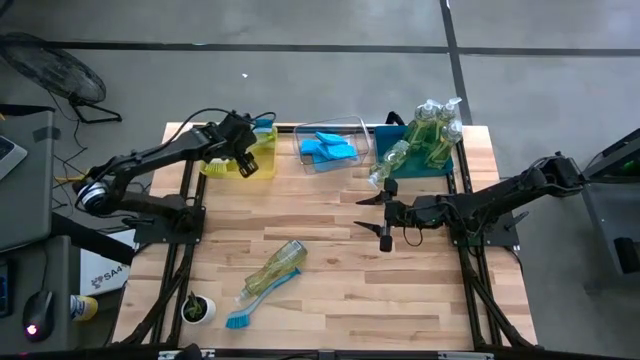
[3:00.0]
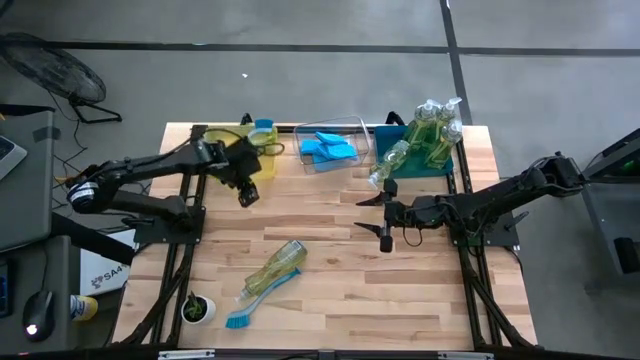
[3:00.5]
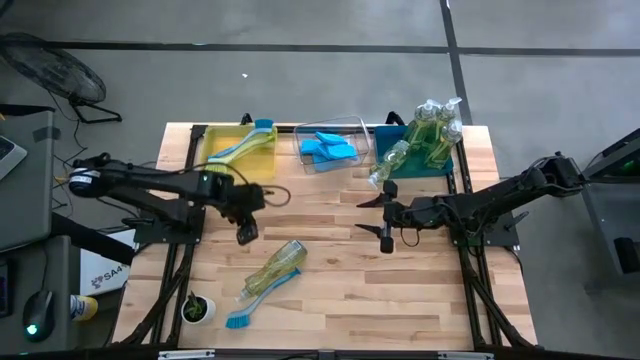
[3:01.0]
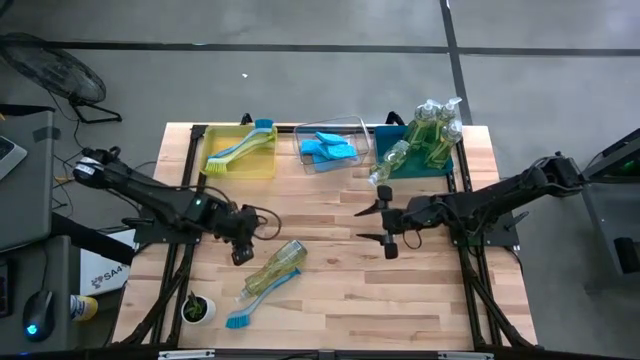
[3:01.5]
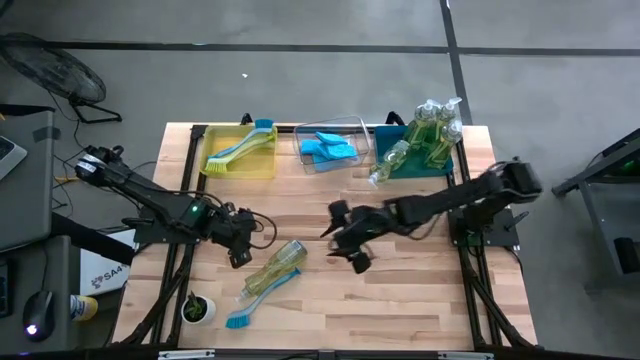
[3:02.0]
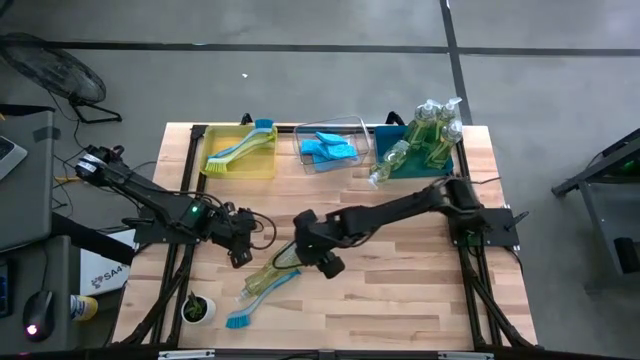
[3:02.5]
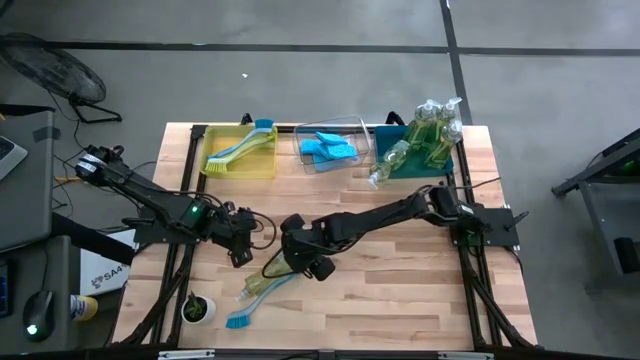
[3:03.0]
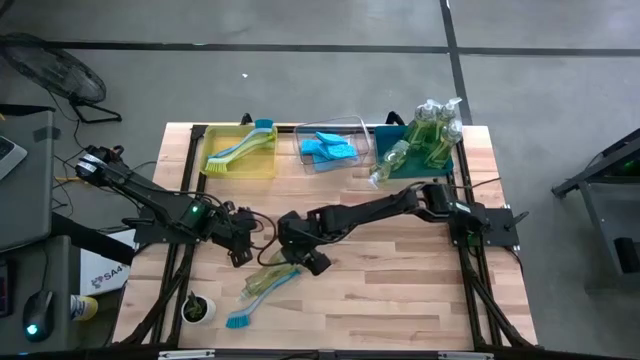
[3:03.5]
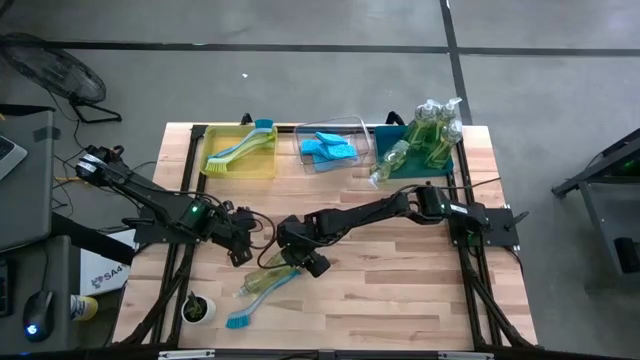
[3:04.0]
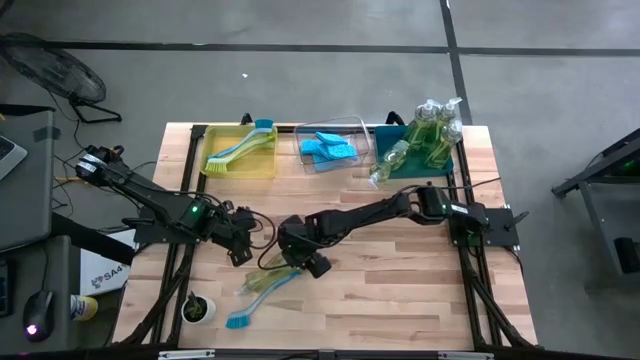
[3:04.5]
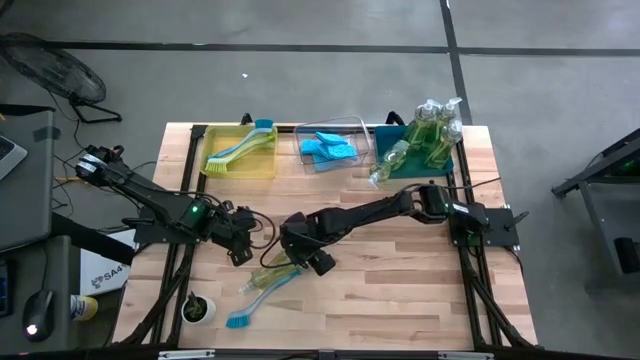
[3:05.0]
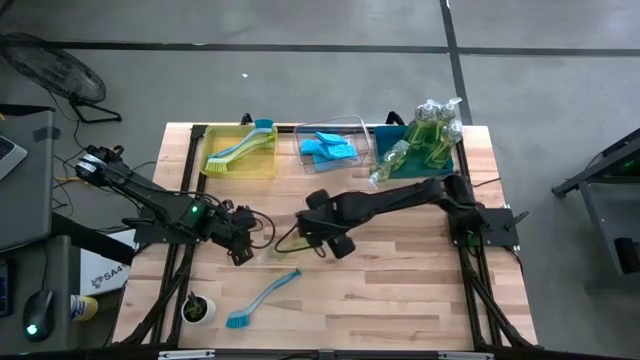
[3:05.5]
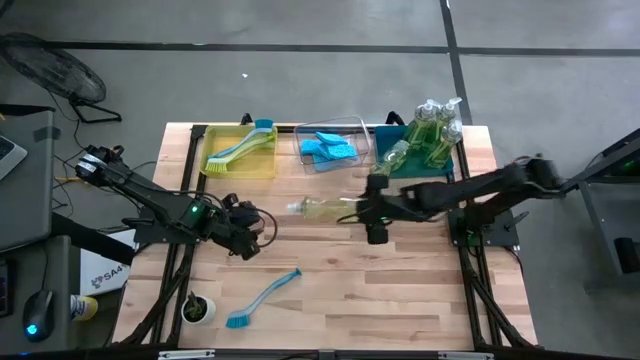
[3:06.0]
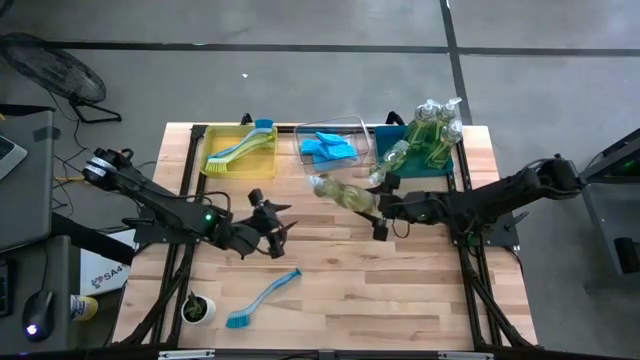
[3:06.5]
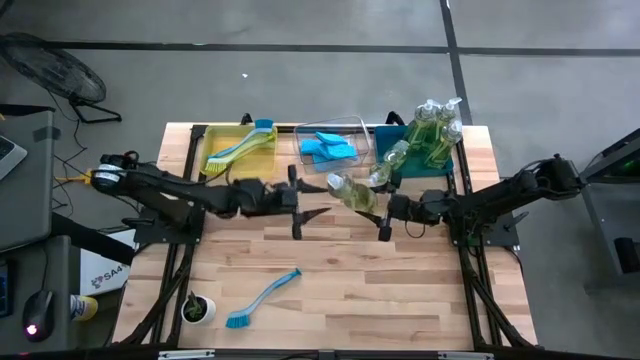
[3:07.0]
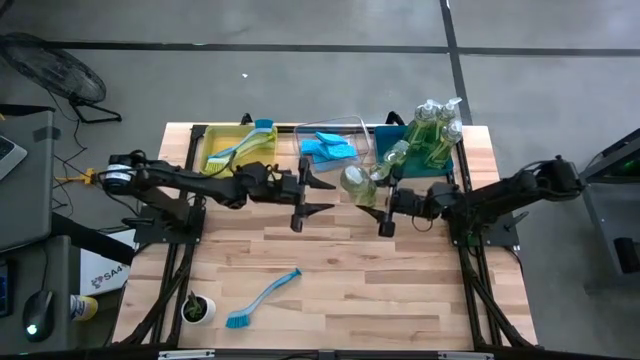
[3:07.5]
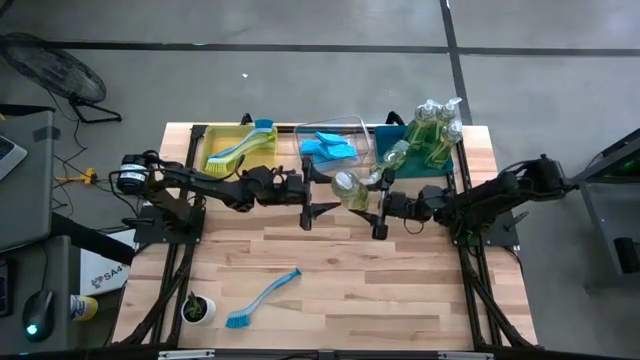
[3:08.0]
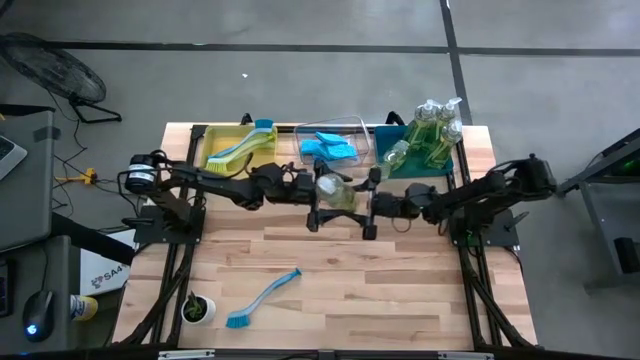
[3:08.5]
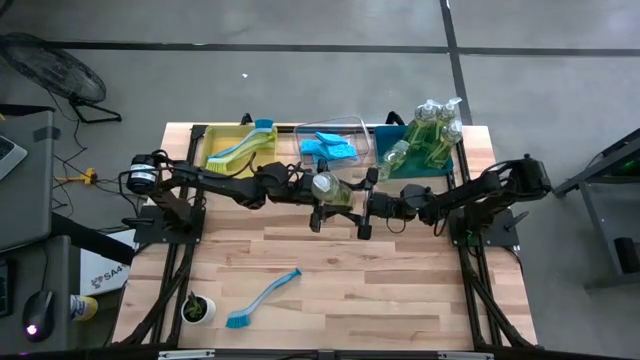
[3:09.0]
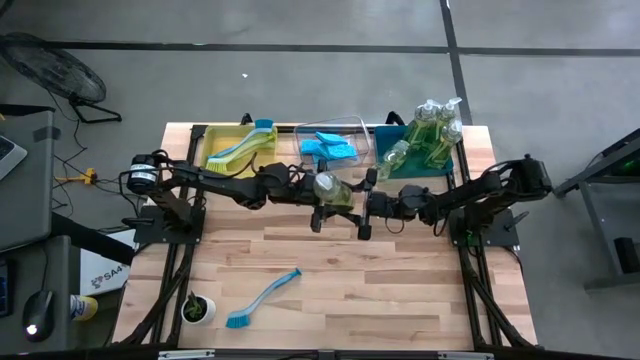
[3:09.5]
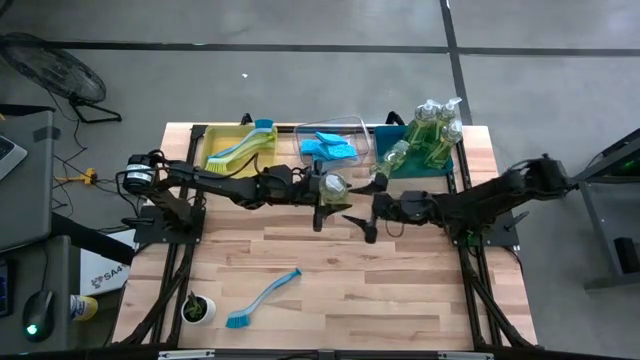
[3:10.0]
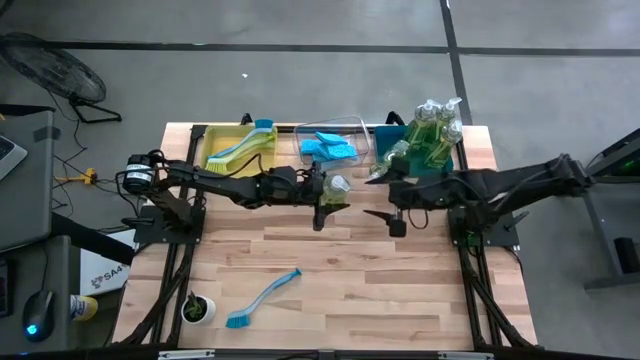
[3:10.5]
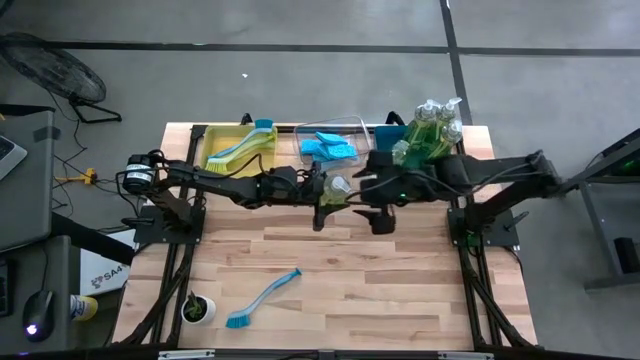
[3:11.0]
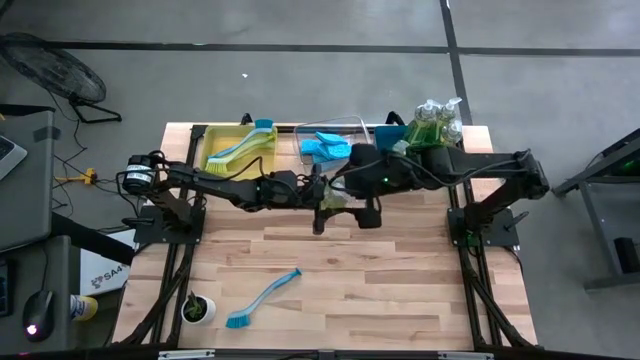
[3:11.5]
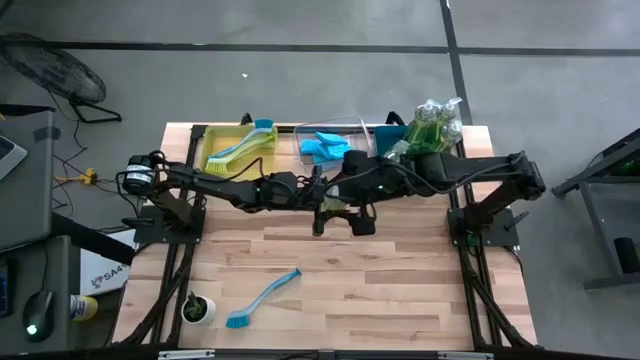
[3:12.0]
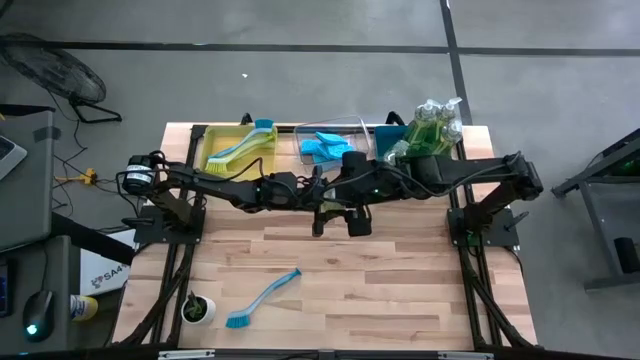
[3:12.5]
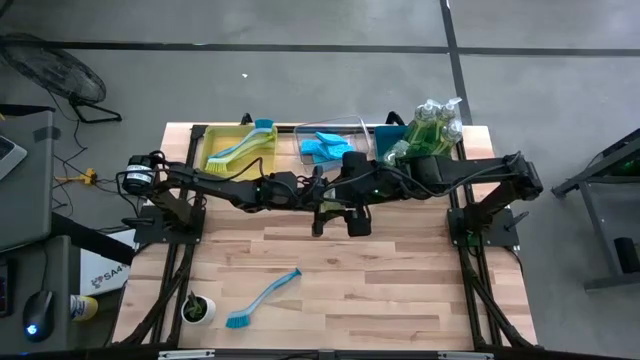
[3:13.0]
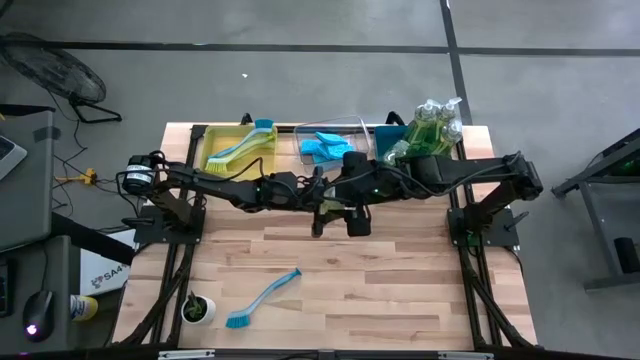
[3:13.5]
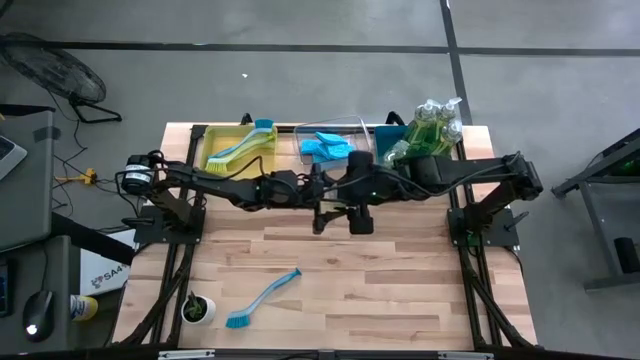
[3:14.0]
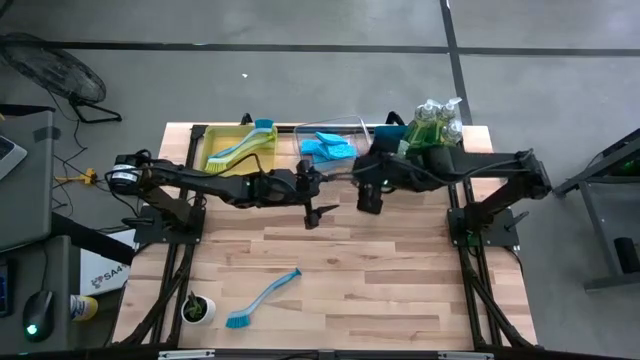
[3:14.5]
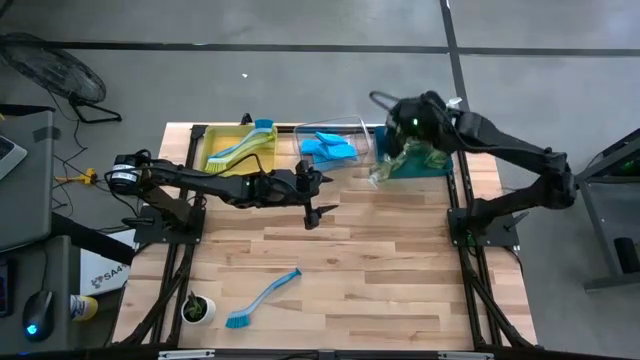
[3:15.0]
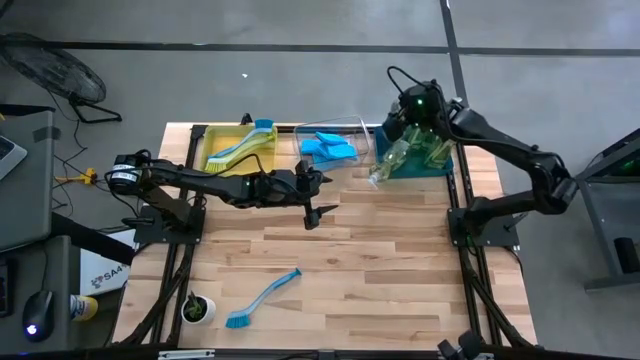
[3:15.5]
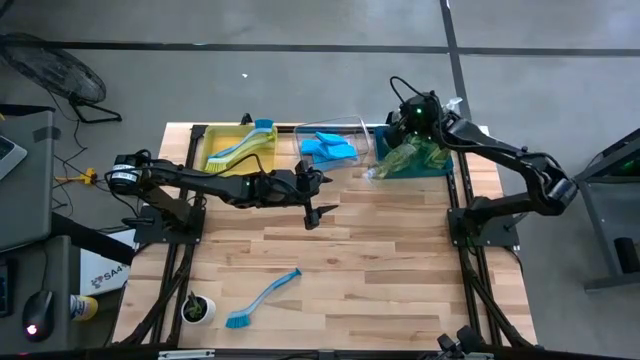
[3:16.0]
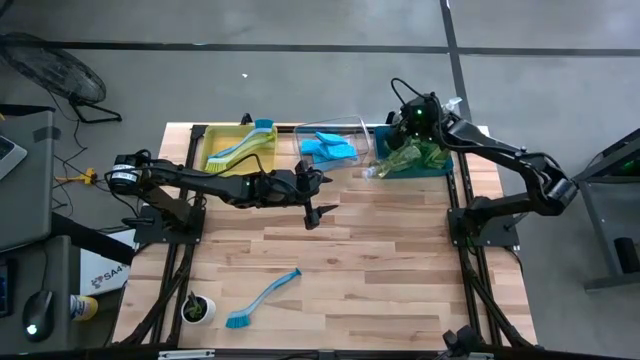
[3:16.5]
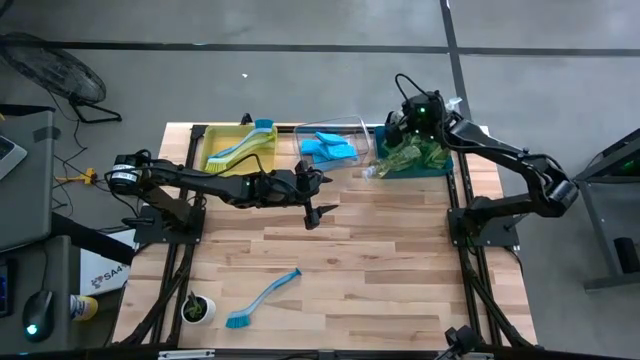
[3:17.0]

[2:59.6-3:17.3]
Task: Pick & Place Kitchen Sink Supplies
Put the dish soap into the blue bin

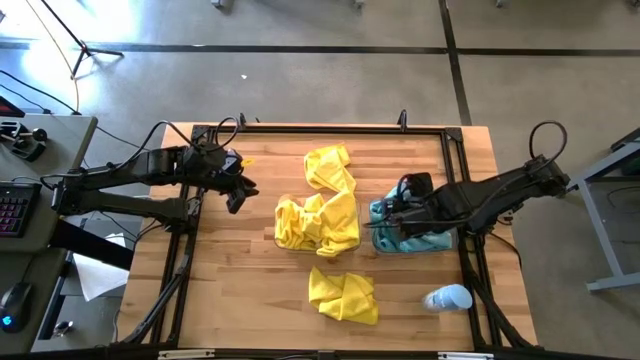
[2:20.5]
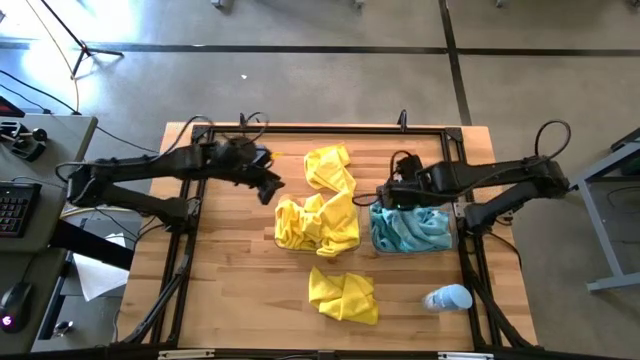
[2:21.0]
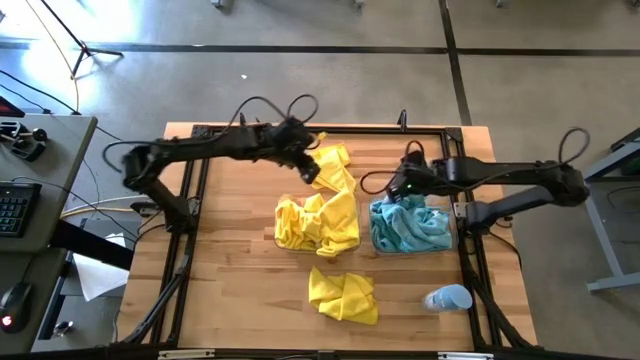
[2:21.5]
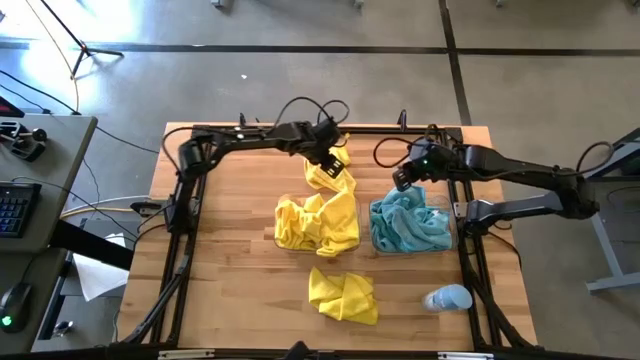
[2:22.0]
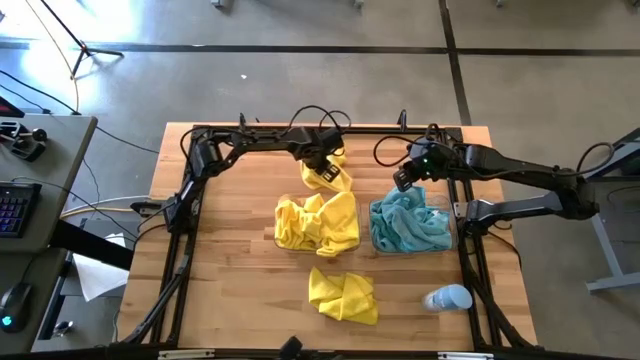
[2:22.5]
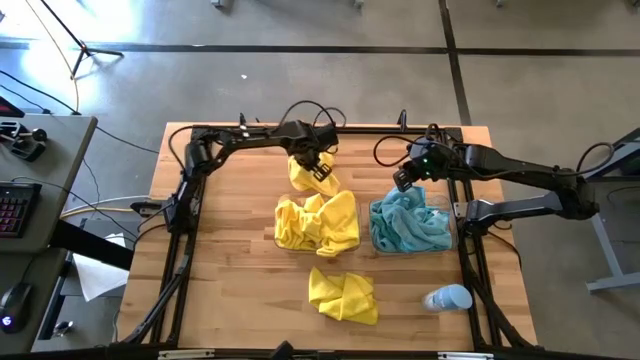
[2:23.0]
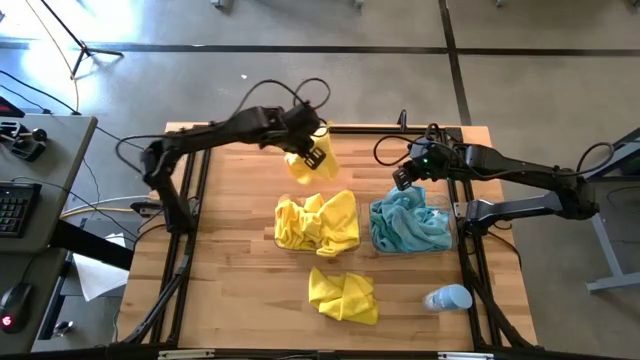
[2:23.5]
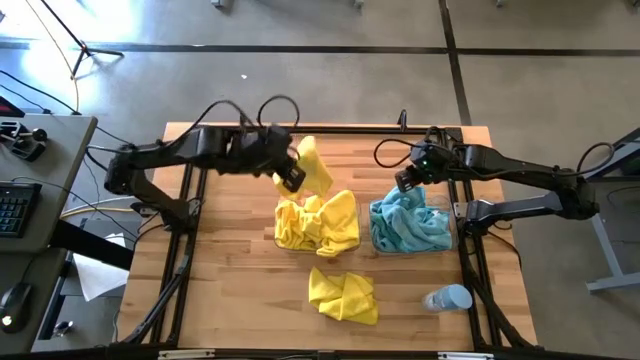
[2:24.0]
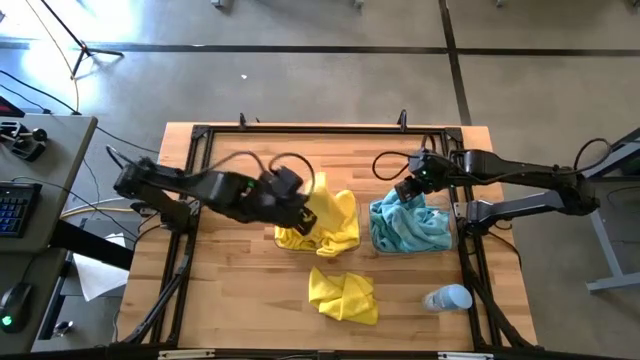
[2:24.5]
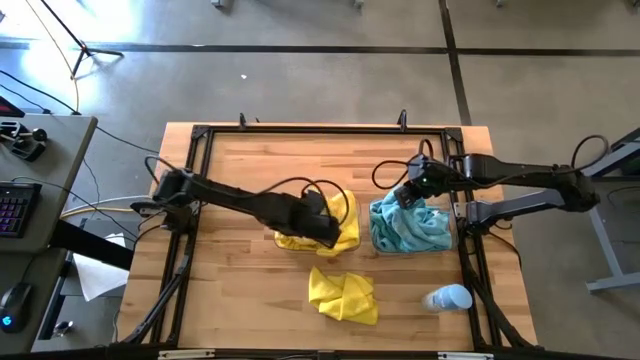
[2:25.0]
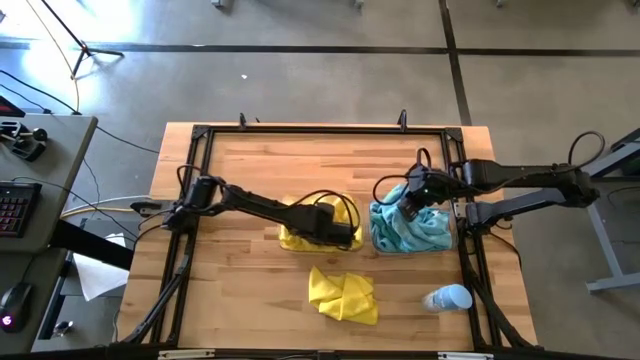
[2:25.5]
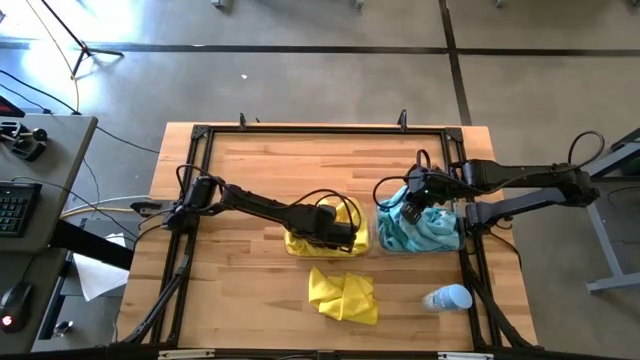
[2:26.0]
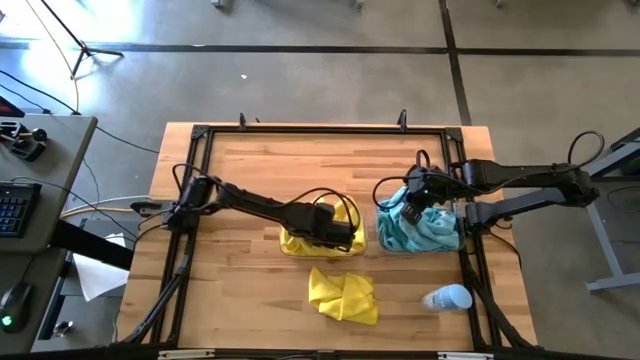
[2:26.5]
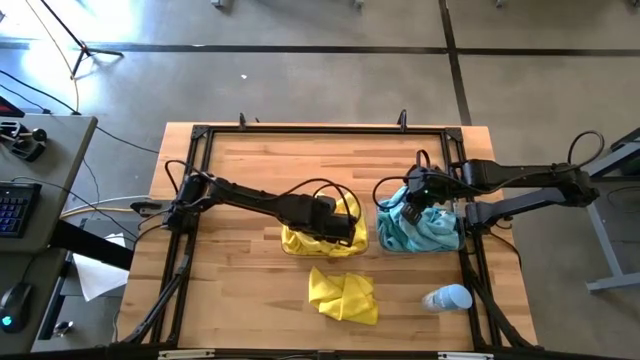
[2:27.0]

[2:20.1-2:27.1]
Task: Sort microfiber towel by color & place in baskets
Put the yellow microfiber cloth into the left transparent bin
